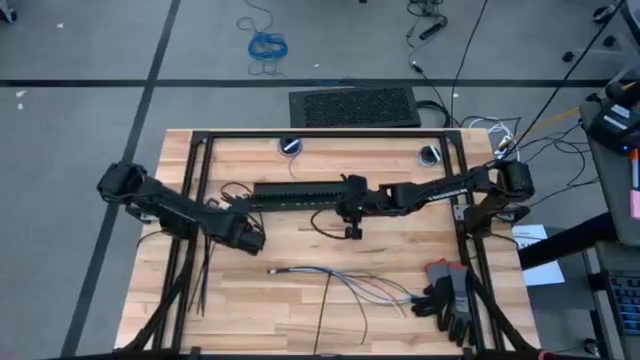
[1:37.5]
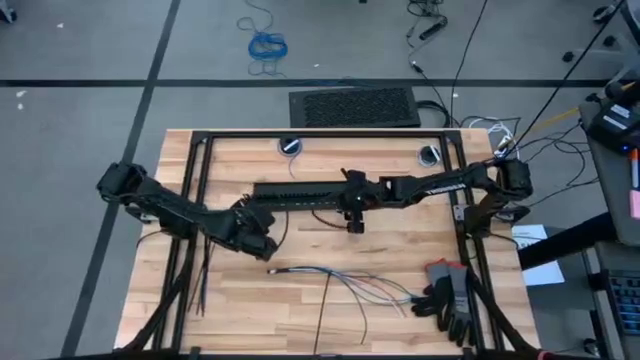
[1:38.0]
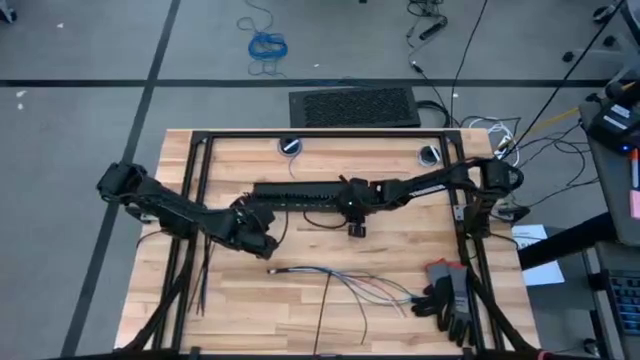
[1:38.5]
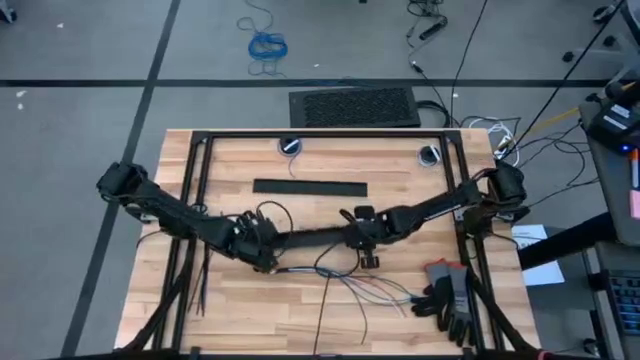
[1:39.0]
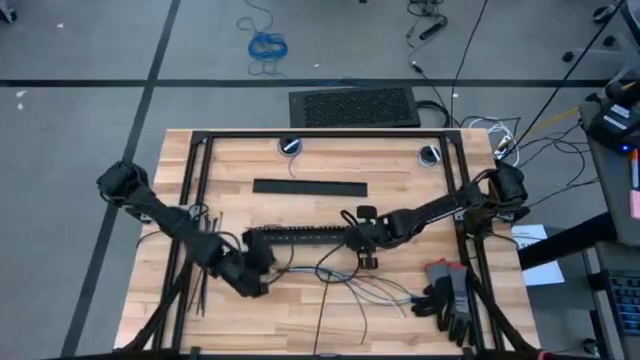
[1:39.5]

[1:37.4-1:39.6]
Task: Ziptie cables
Adjust the cable duct

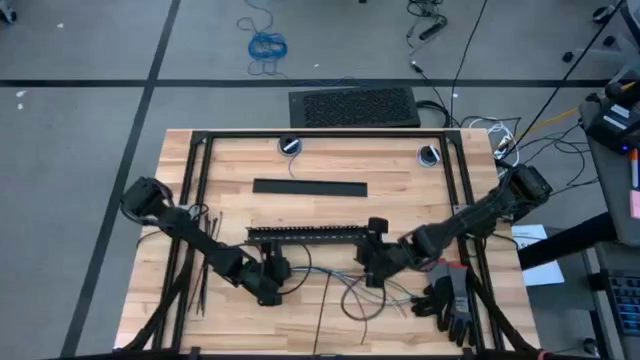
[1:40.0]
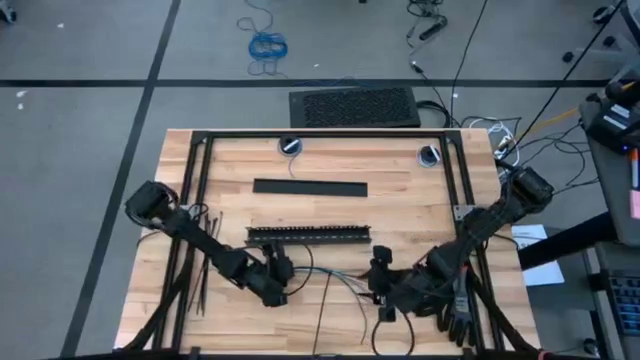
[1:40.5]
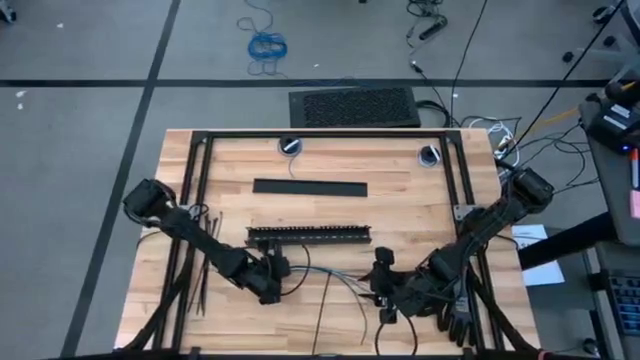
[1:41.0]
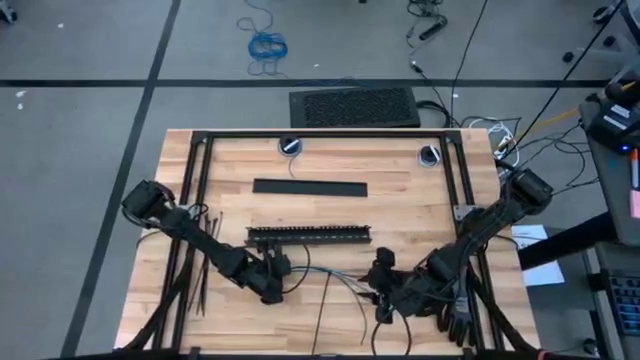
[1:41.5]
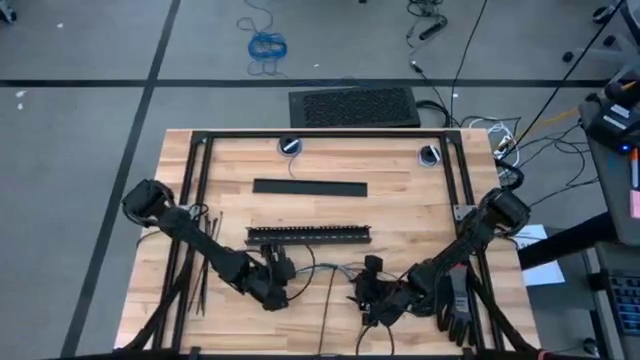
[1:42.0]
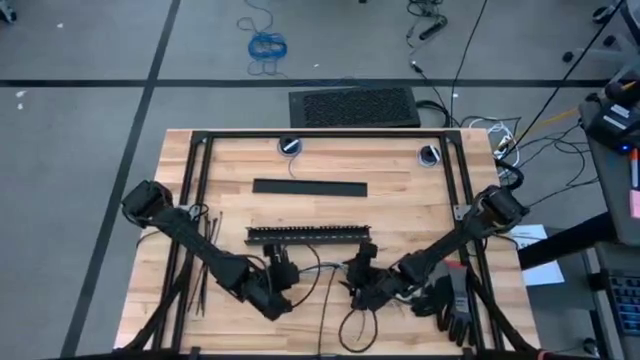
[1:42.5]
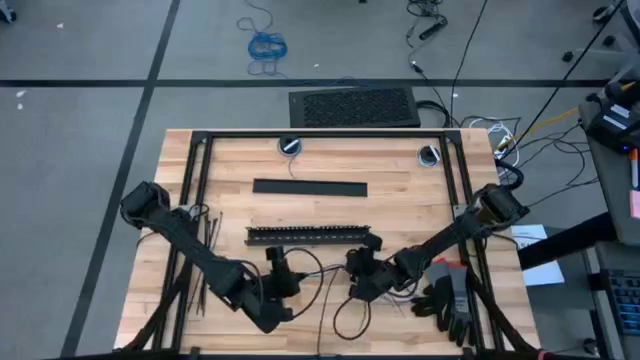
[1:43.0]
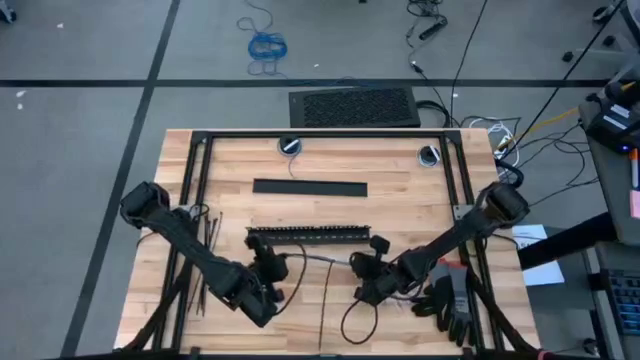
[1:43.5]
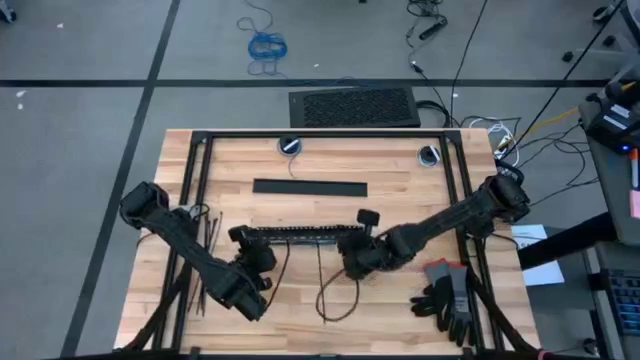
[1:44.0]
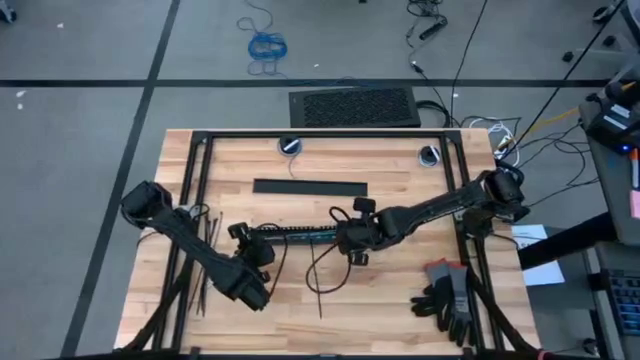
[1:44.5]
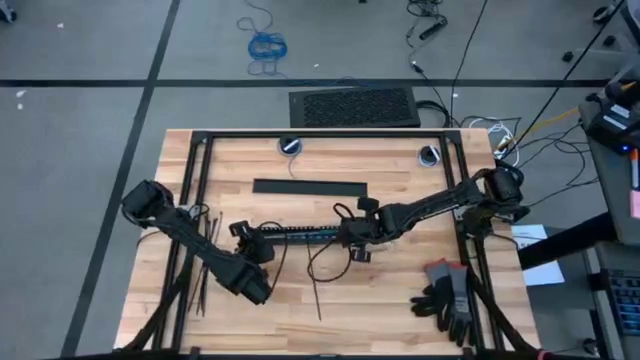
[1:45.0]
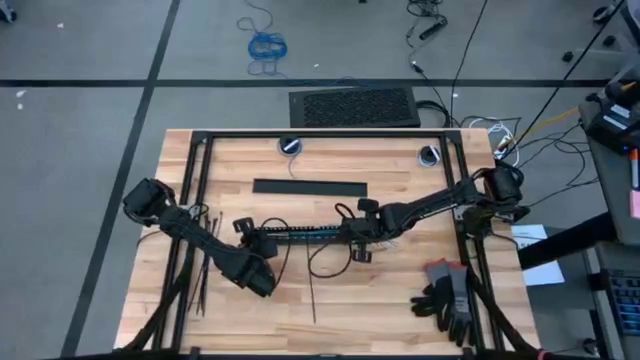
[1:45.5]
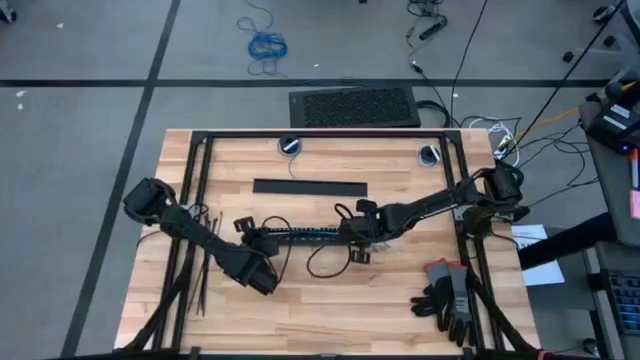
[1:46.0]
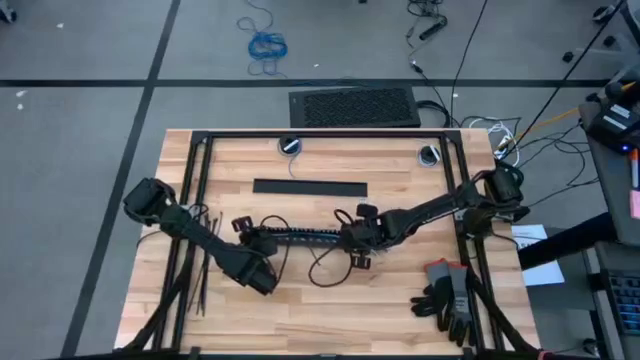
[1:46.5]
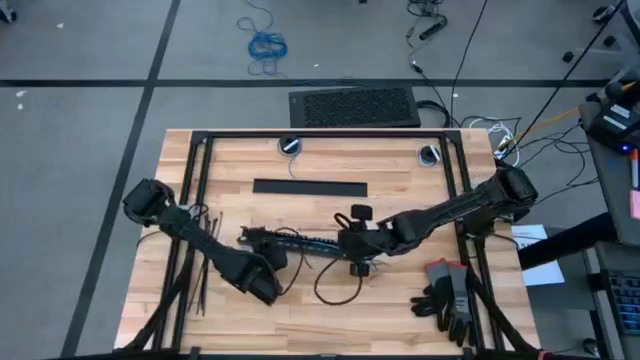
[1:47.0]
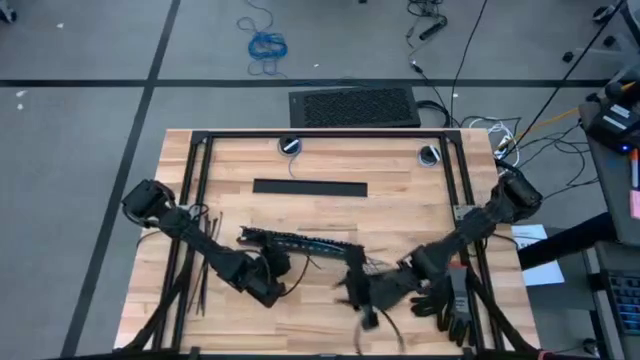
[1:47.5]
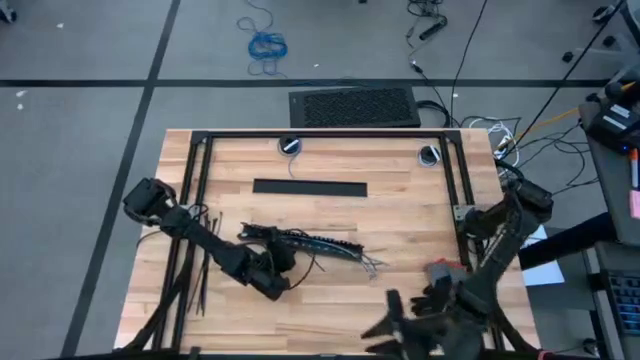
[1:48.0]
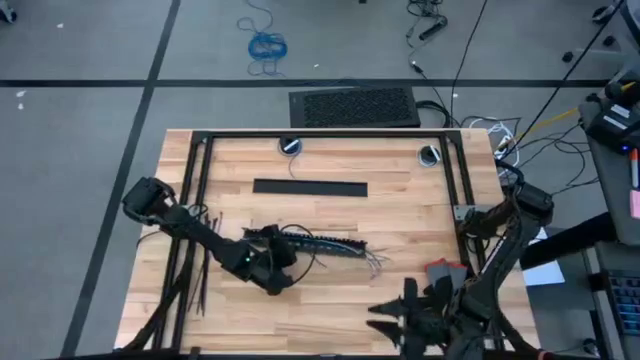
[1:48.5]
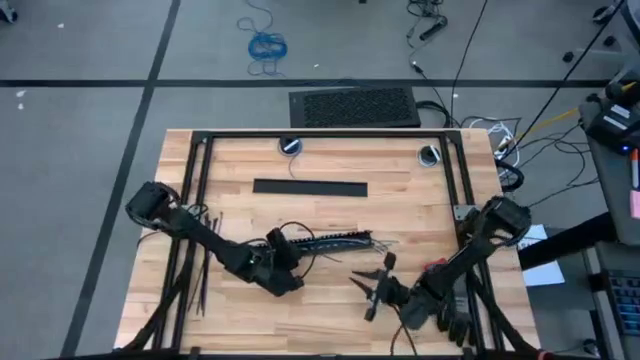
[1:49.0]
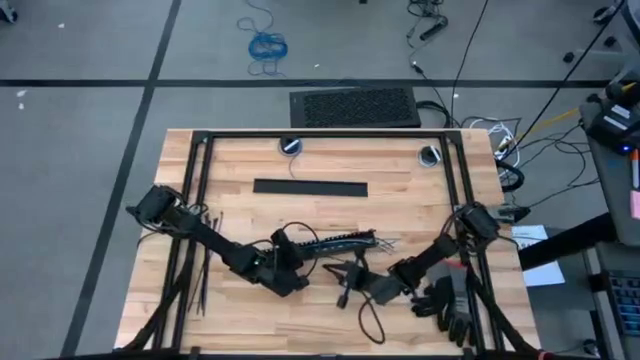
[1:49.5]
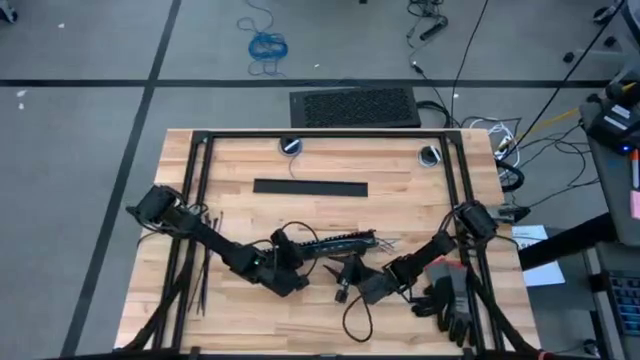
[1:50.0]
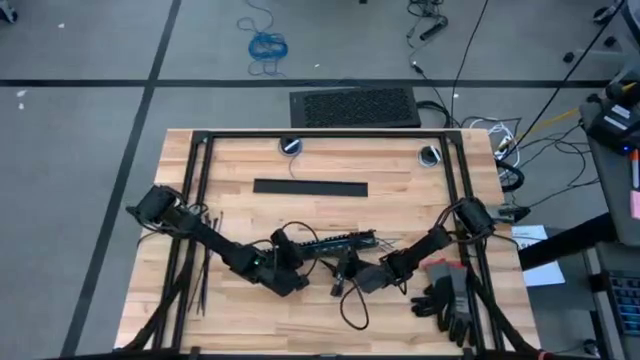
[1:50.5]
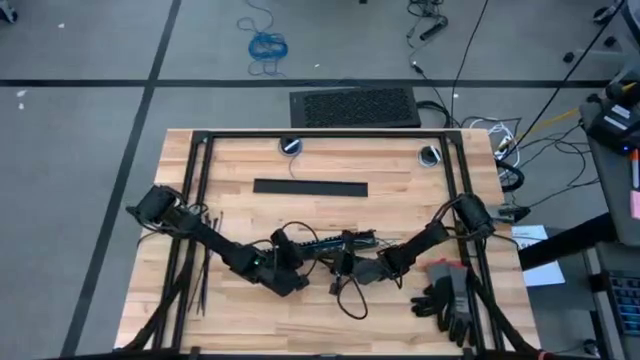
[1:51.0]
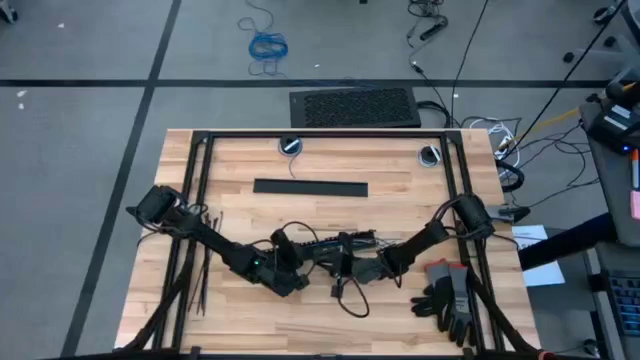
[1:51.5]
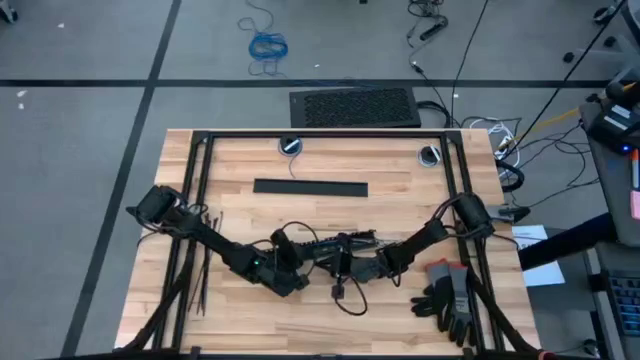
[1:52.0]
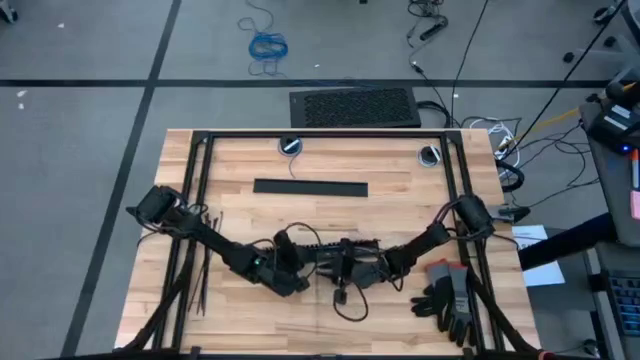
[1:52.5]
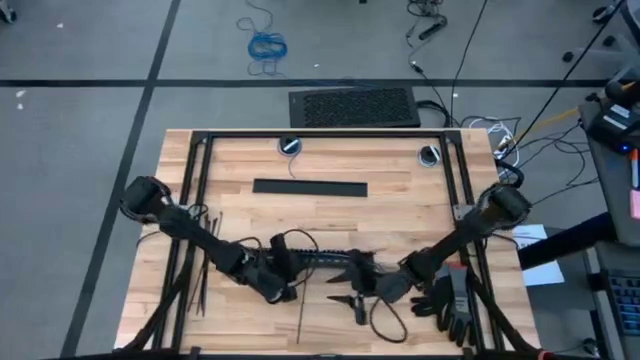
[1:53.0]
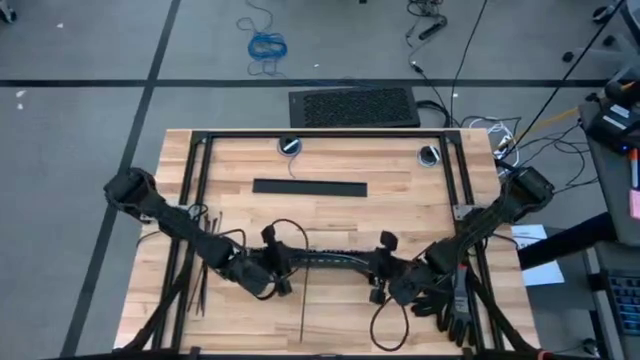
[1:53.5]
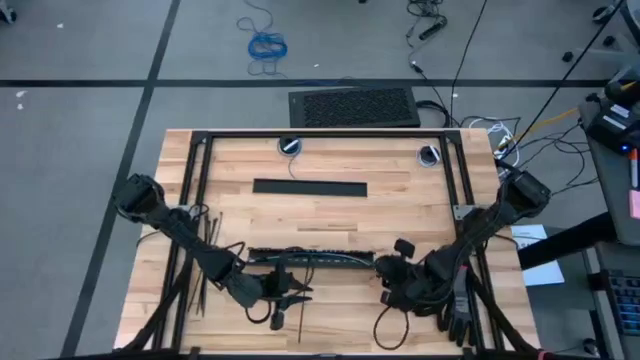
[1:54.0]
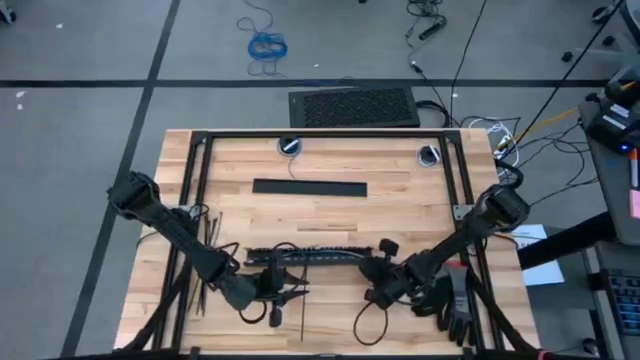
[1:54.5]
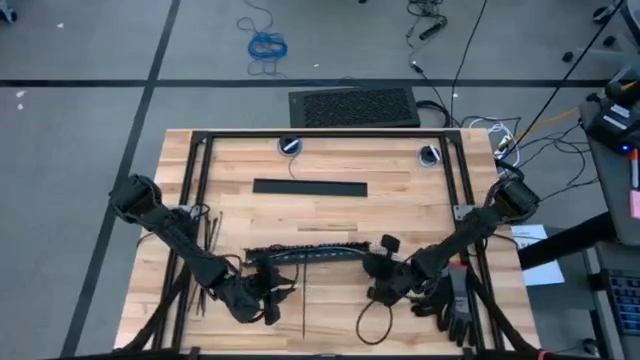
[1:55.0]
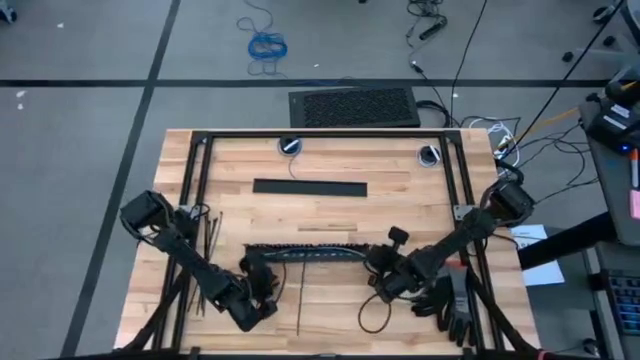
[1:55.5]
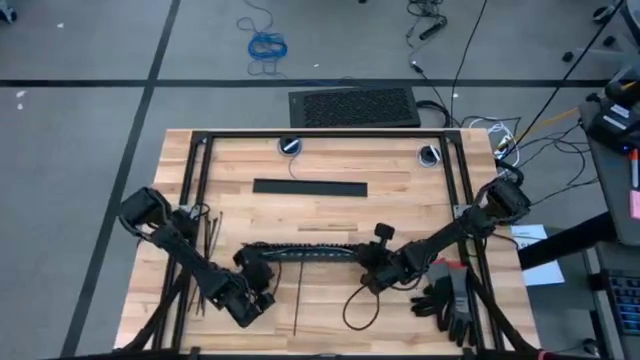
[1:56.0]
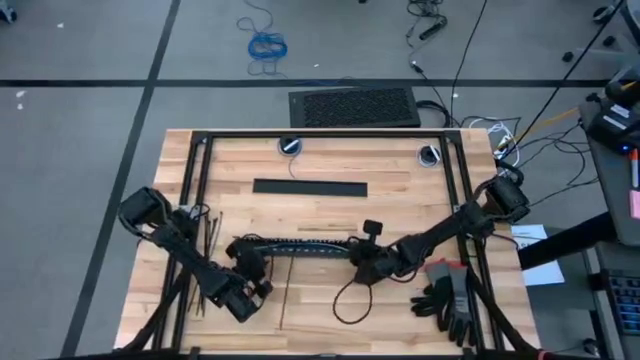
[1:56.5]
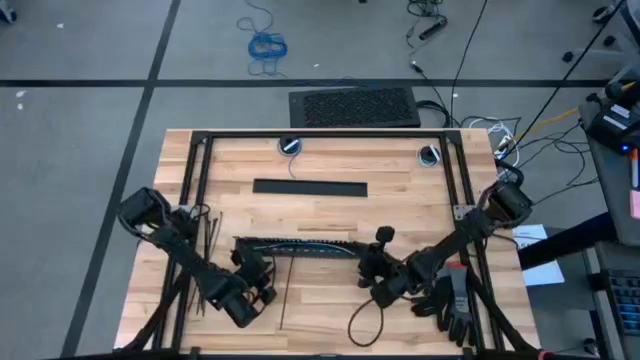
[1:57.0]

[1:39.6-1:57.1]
Put the cable wires into the cable duct
